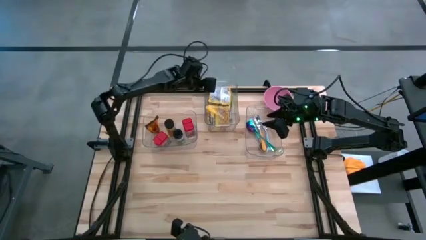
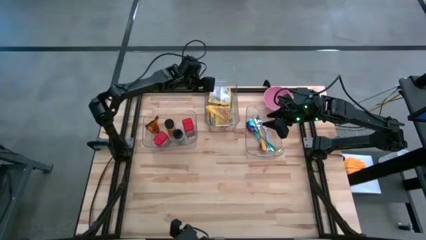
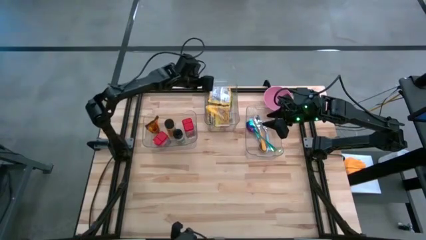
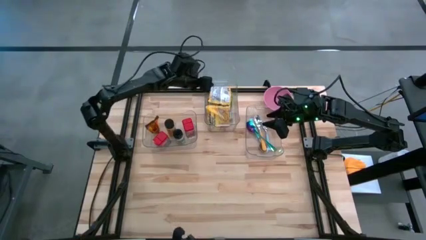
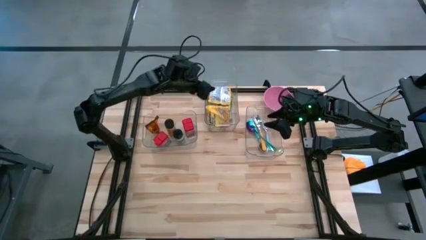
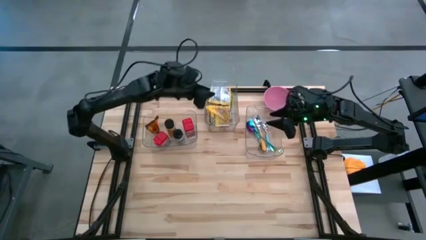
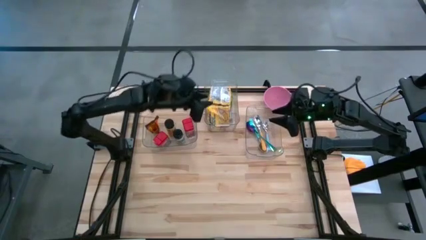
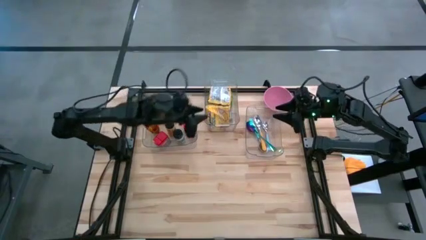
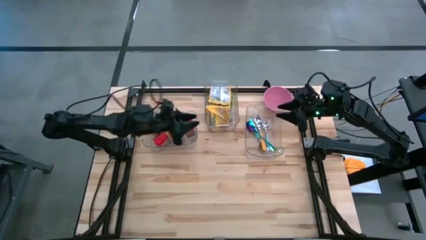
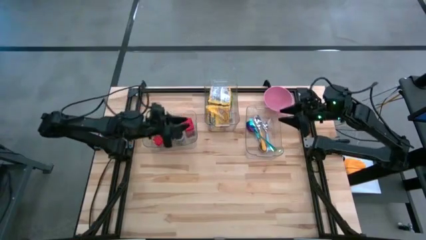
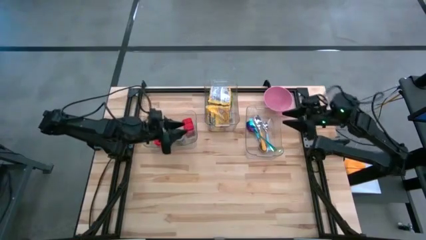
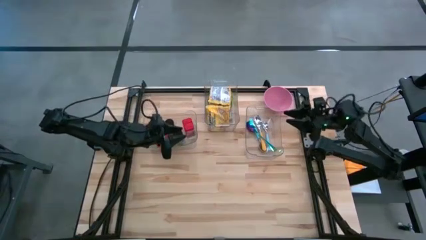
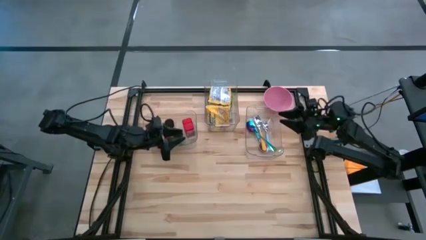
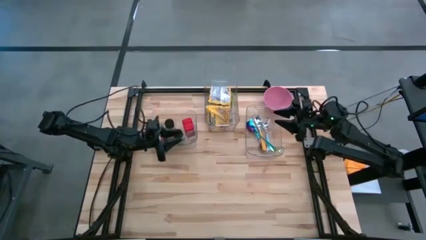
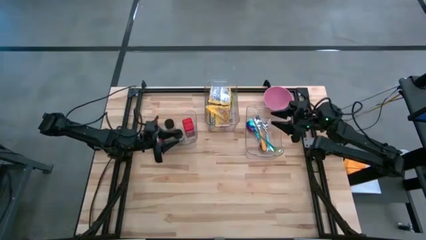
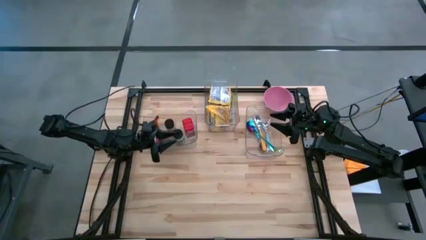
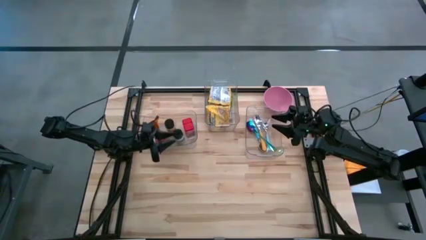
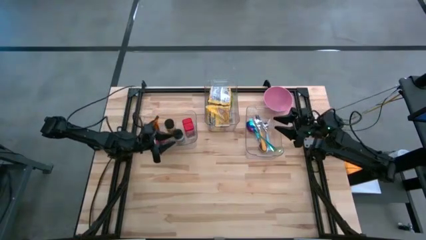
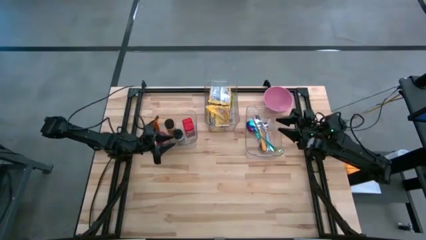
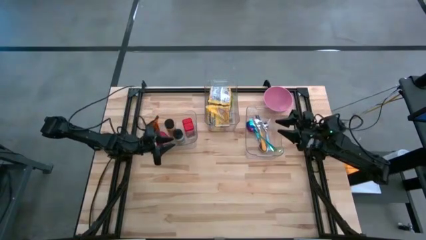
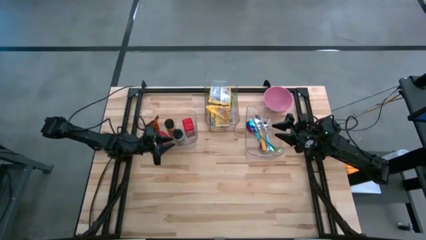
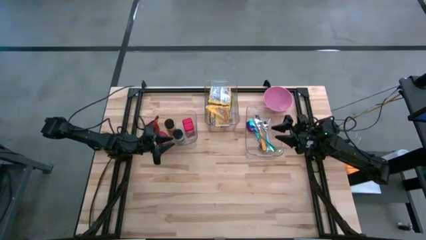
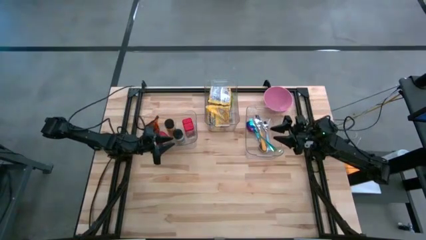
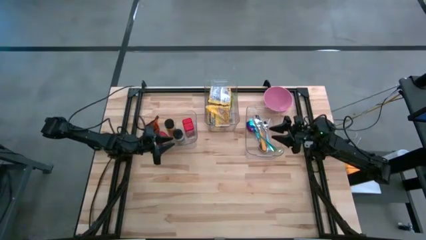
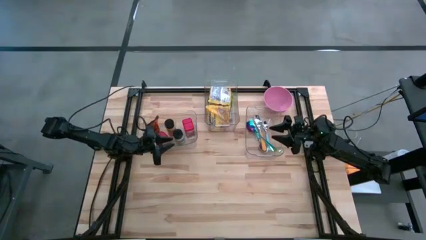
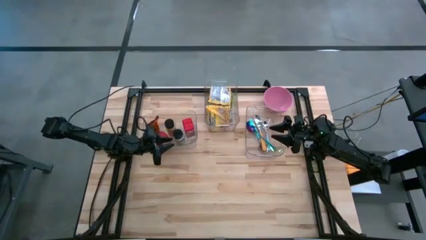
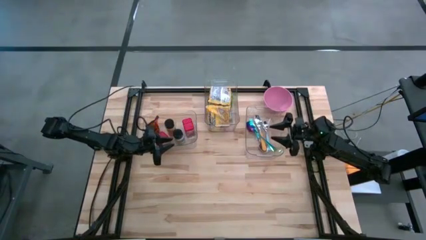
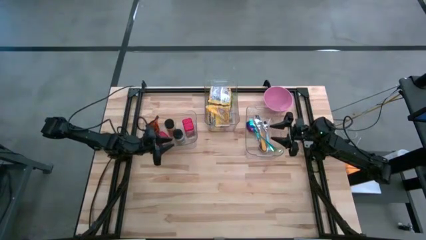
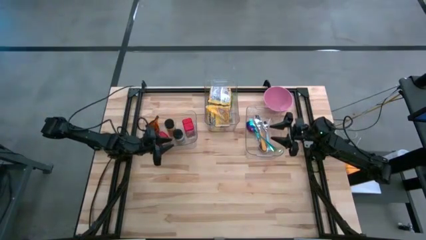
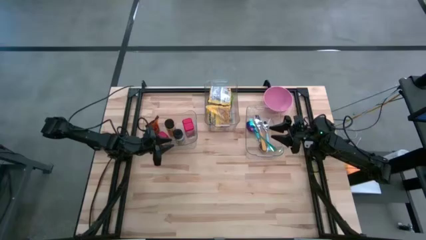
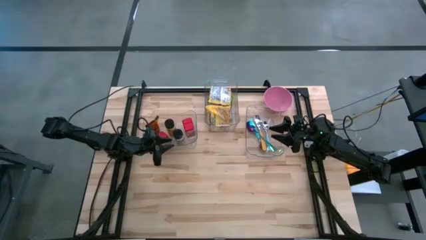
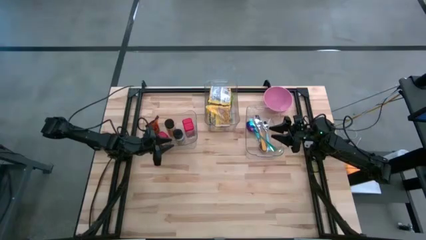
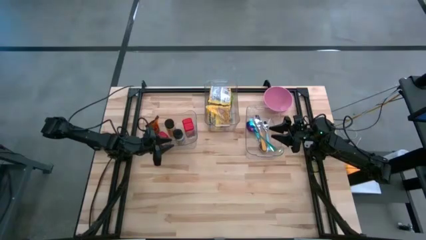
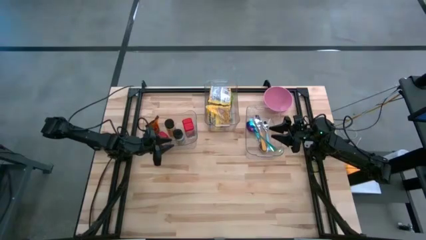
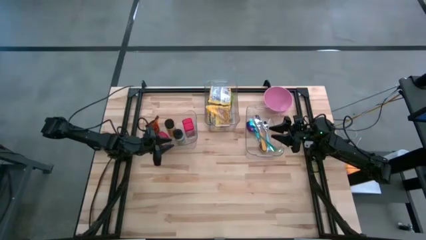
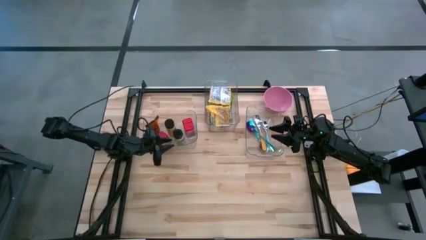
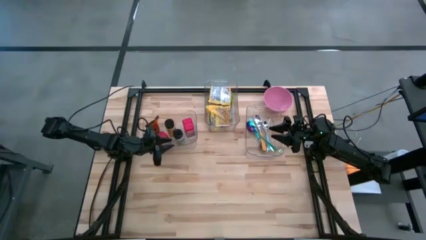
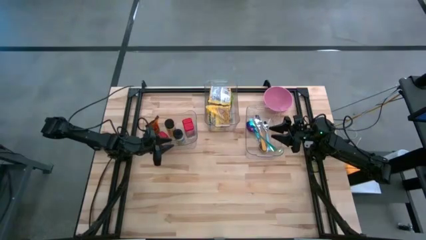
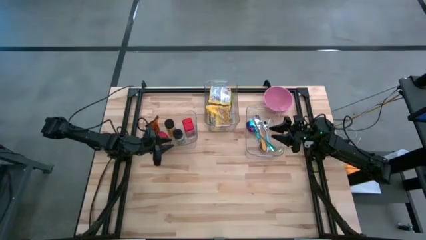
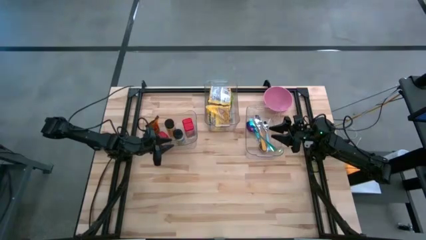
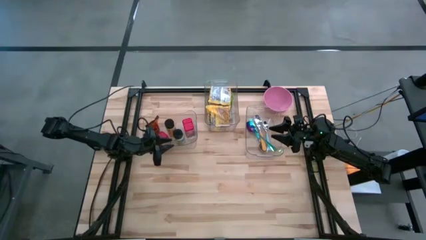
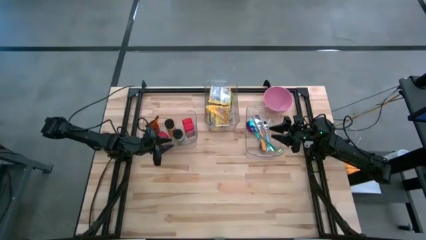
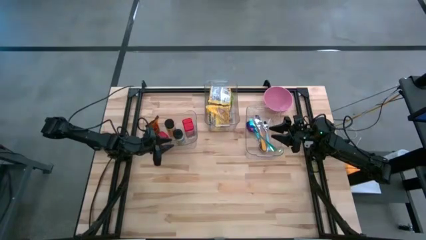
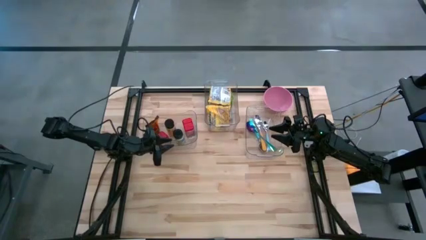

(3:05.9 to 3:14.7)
Return to Home Position

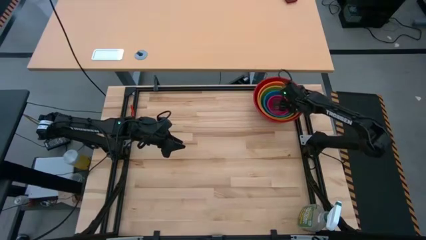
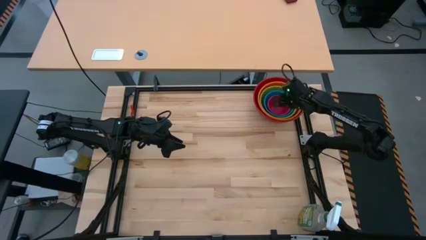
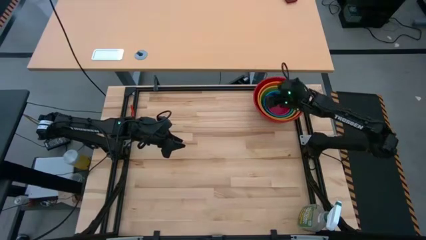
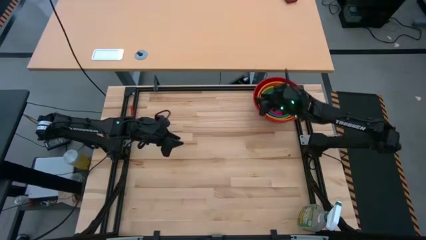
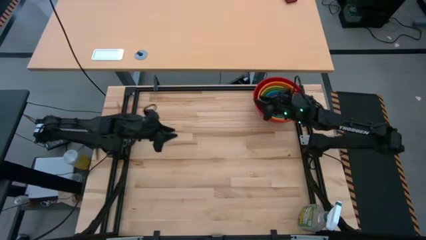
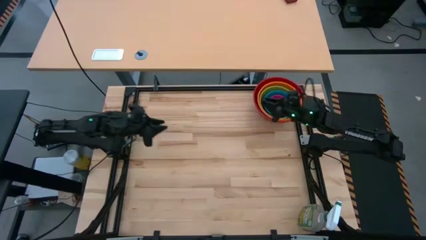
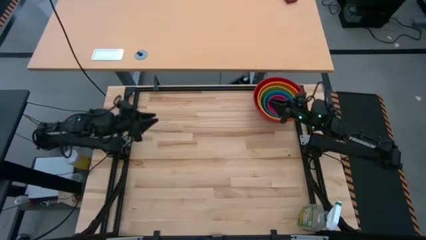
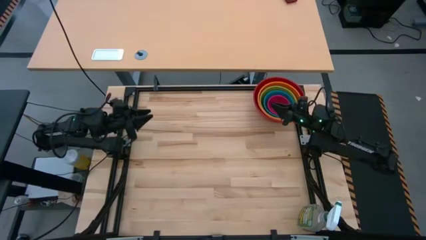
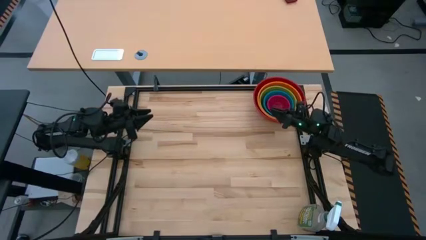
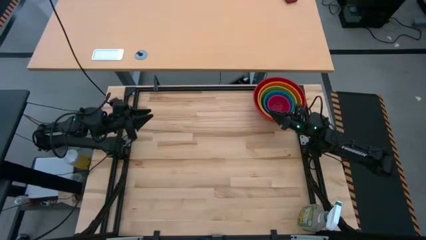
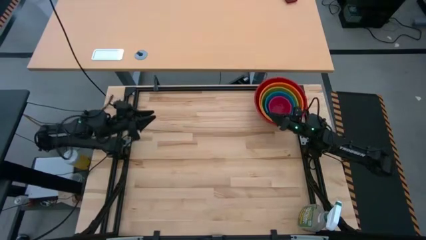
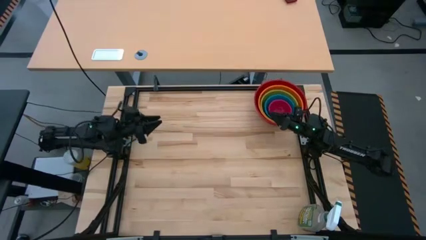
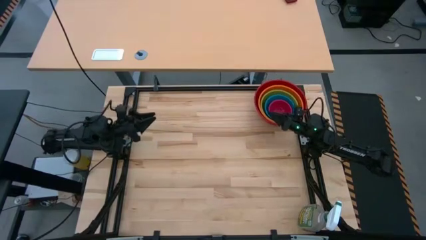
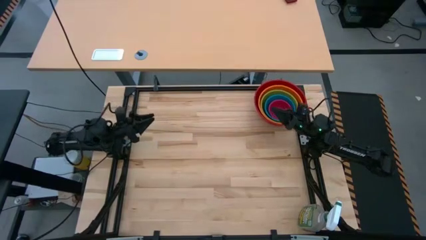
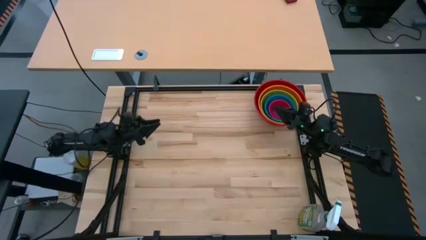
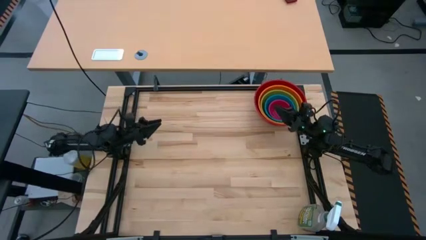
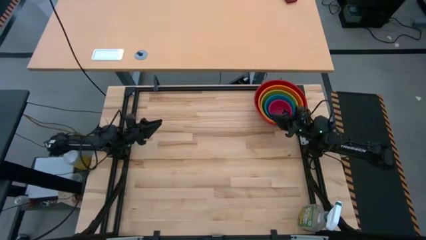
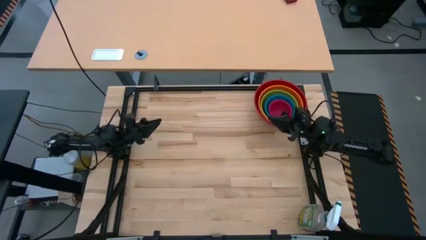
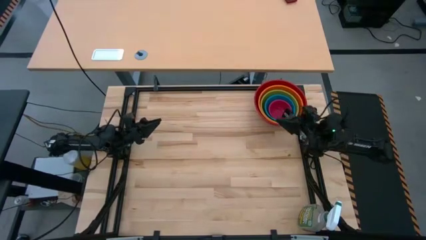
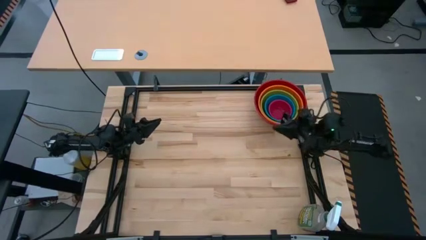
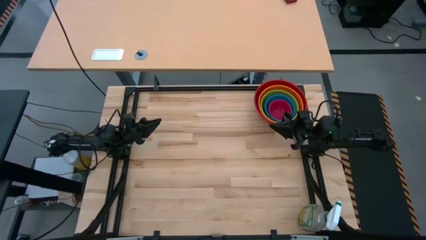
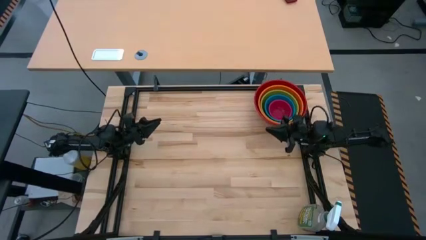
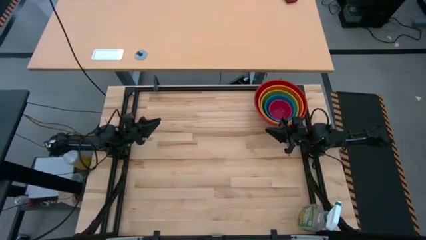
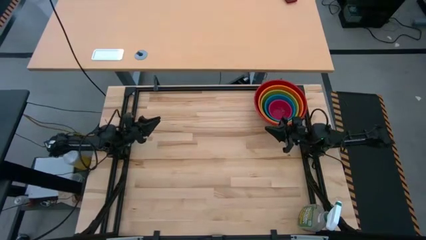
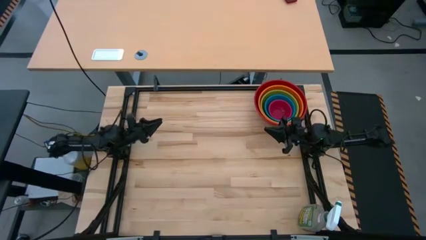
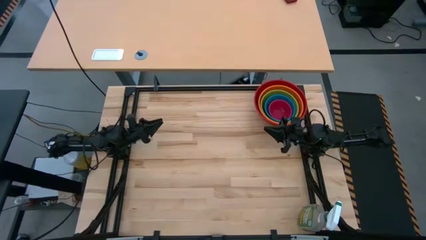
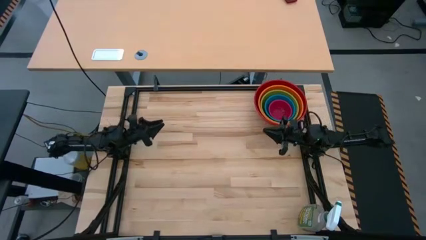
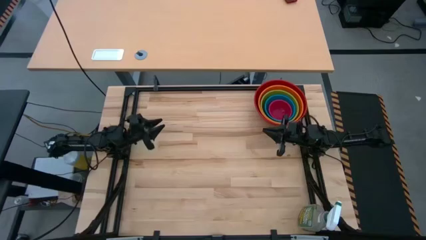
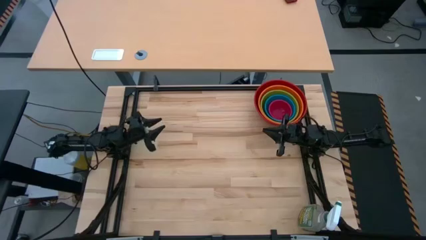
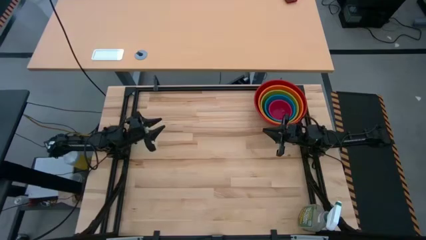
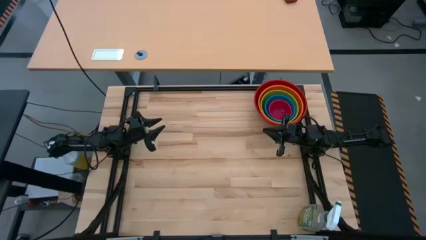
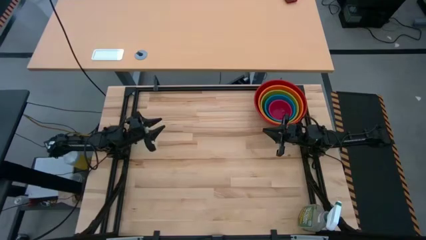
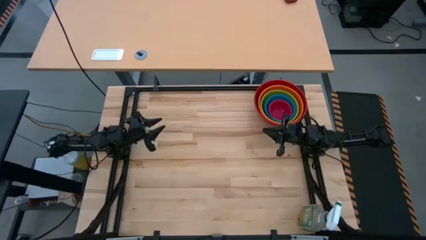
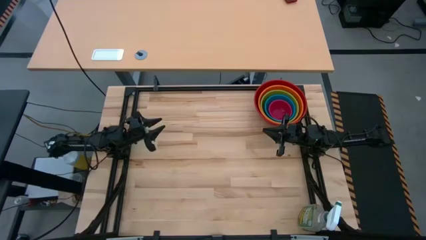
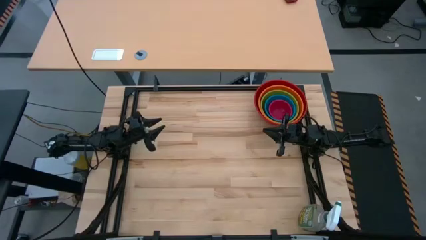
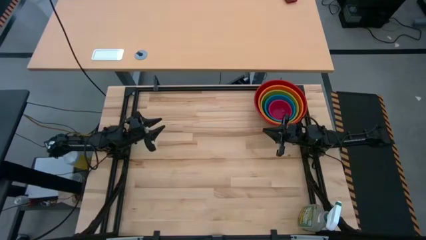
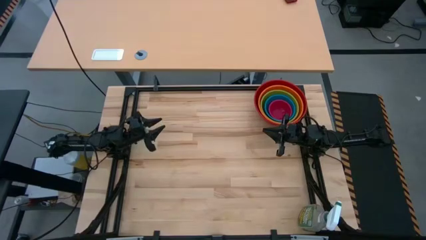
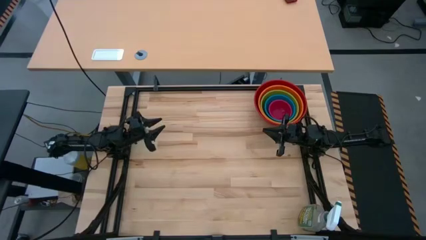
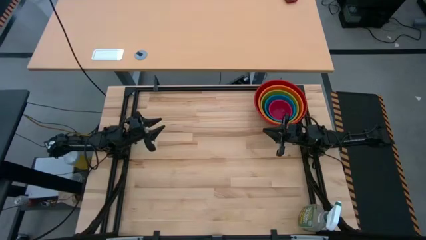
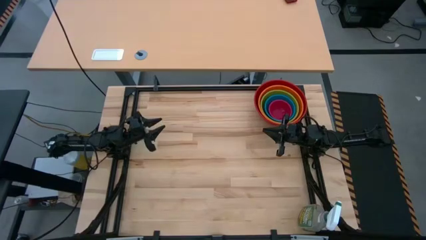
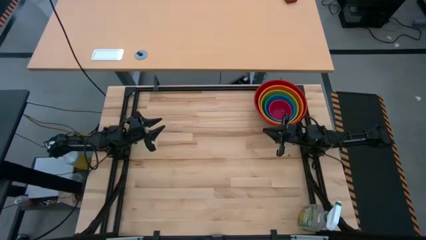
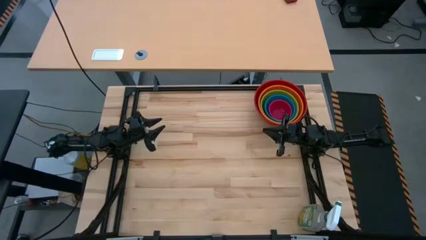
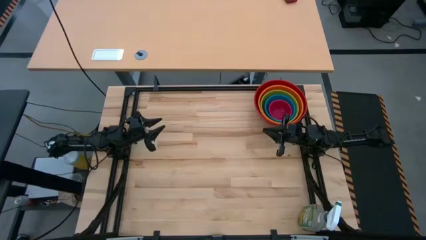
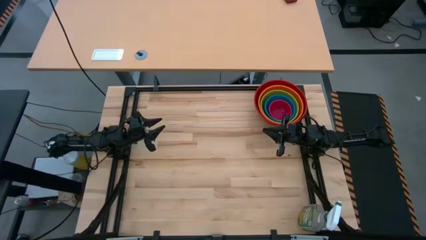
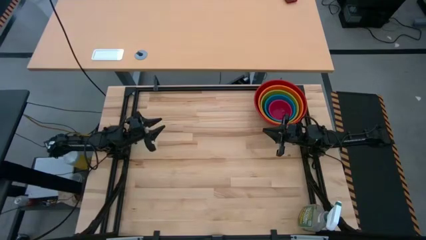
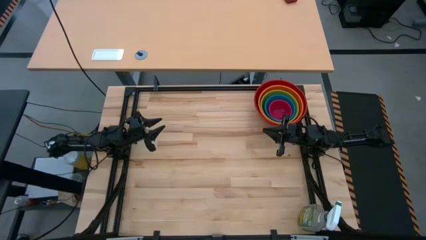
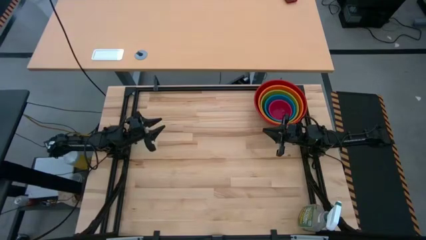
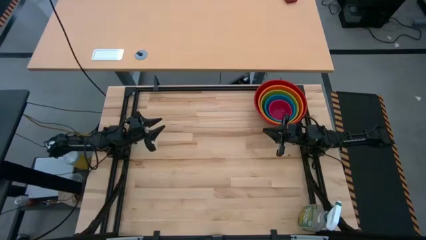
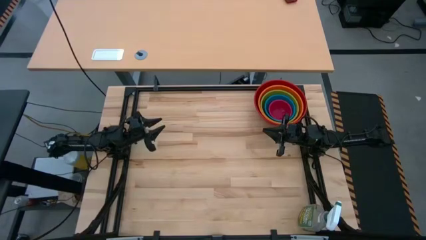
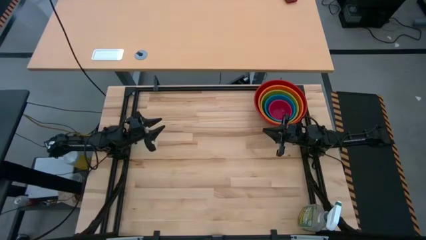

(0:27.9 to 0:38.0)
Return to Home Position
